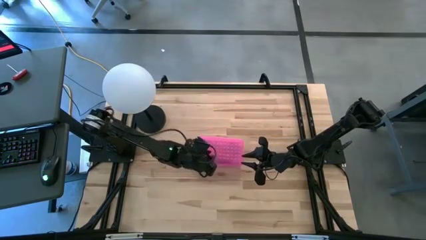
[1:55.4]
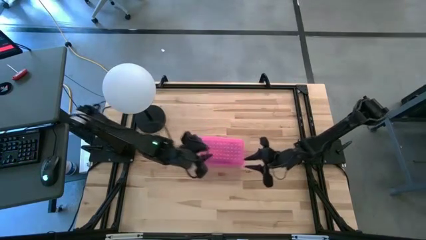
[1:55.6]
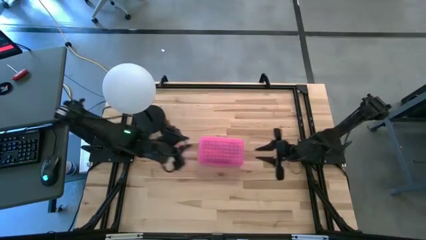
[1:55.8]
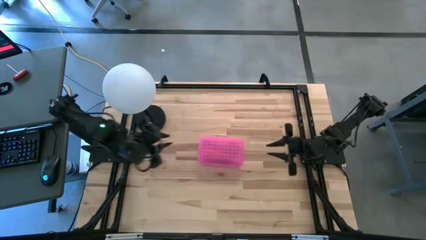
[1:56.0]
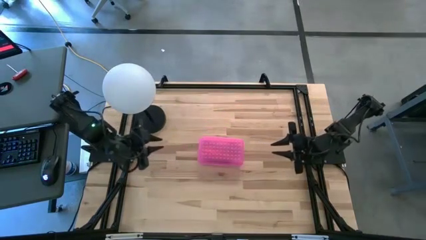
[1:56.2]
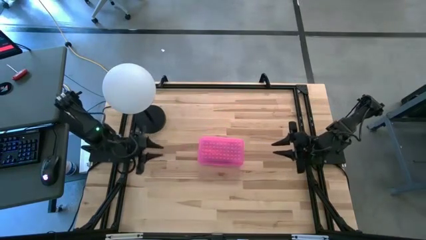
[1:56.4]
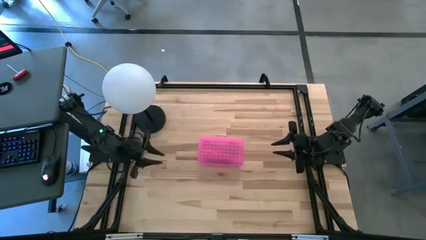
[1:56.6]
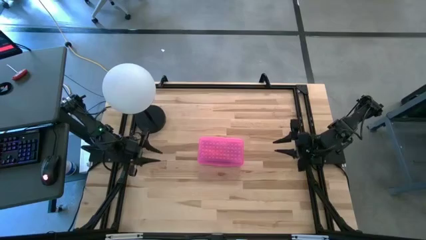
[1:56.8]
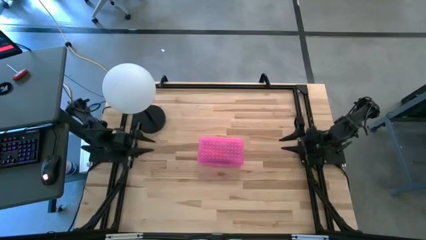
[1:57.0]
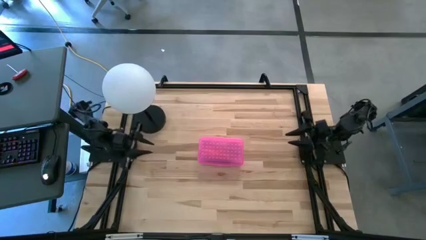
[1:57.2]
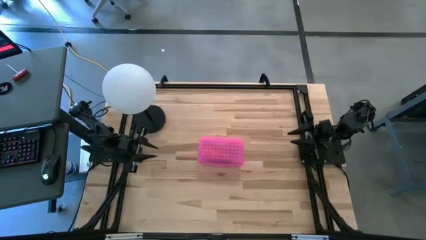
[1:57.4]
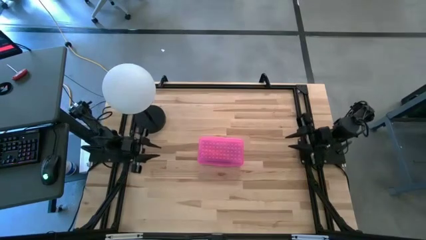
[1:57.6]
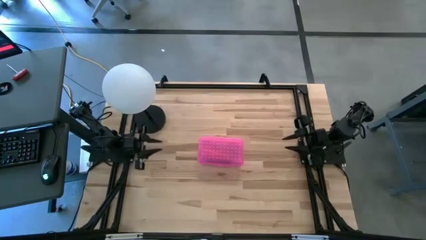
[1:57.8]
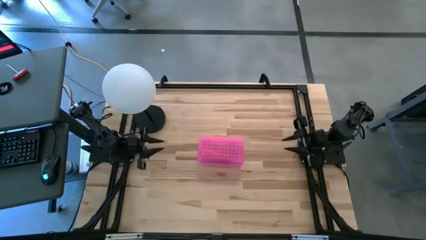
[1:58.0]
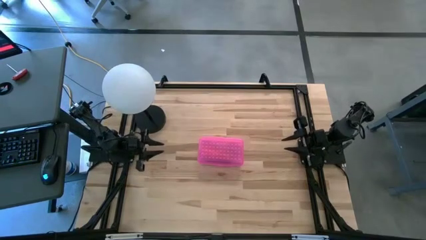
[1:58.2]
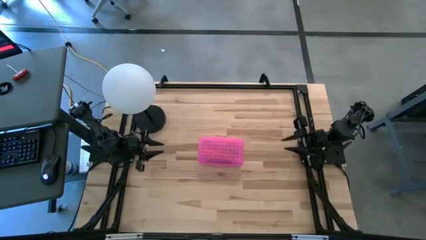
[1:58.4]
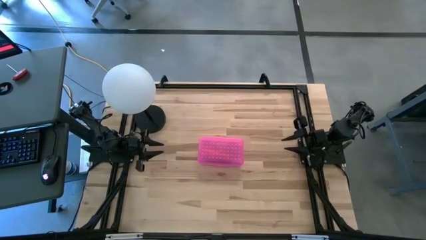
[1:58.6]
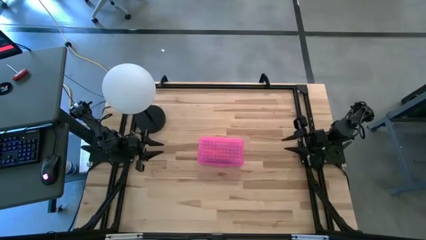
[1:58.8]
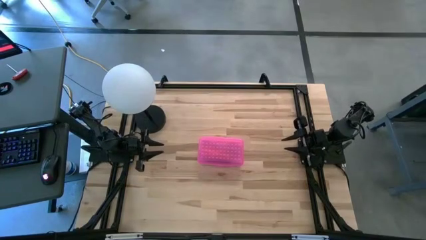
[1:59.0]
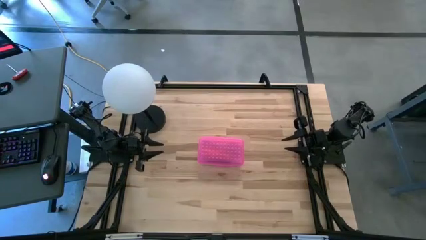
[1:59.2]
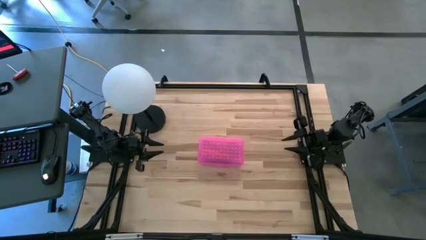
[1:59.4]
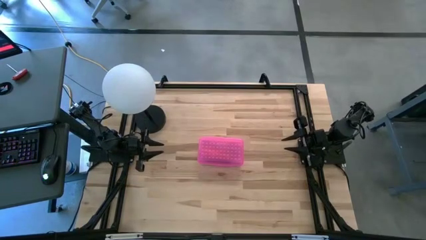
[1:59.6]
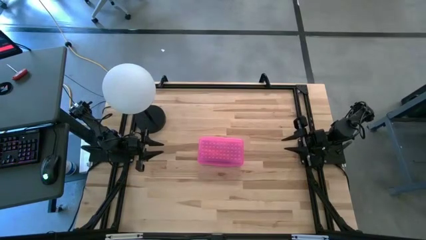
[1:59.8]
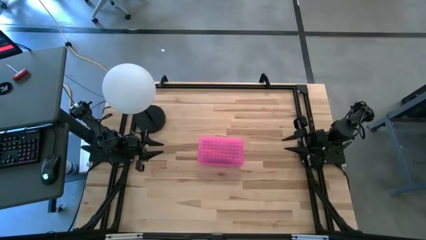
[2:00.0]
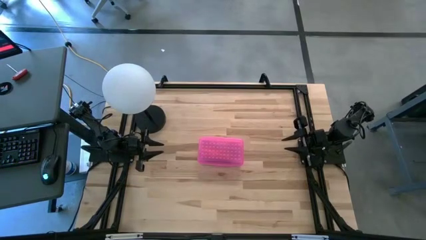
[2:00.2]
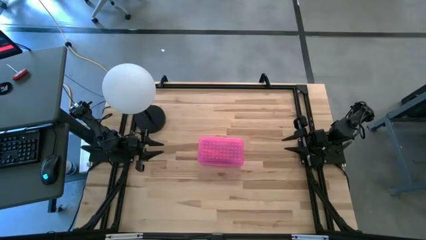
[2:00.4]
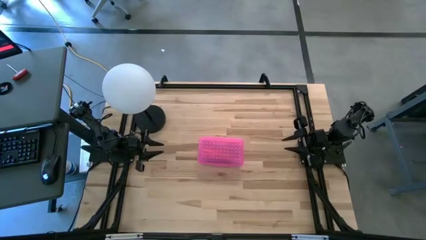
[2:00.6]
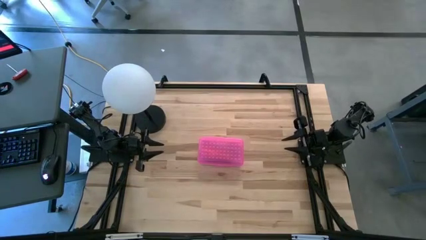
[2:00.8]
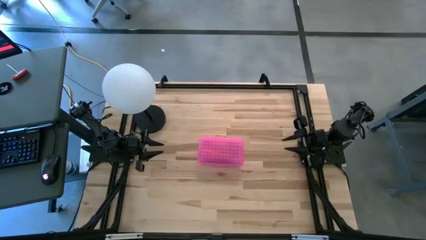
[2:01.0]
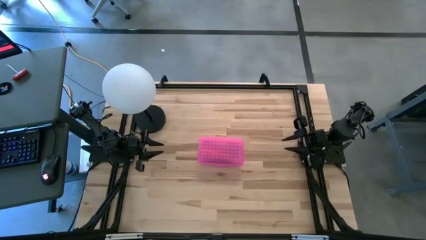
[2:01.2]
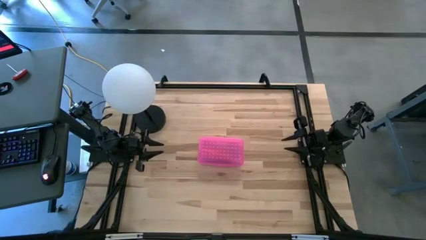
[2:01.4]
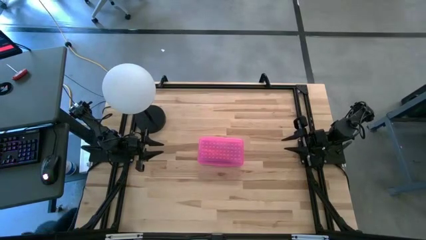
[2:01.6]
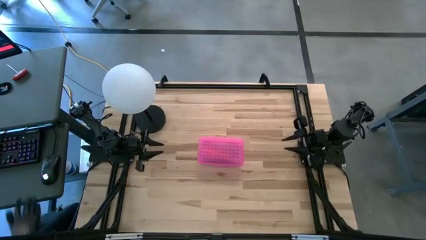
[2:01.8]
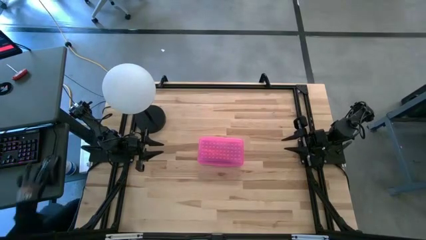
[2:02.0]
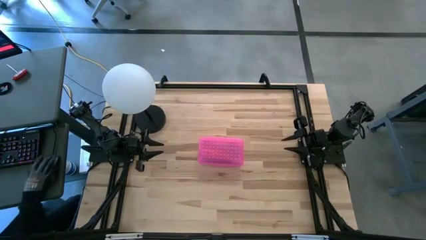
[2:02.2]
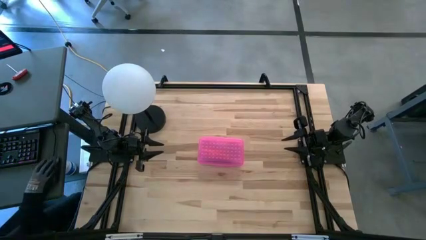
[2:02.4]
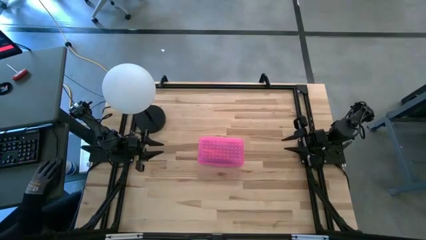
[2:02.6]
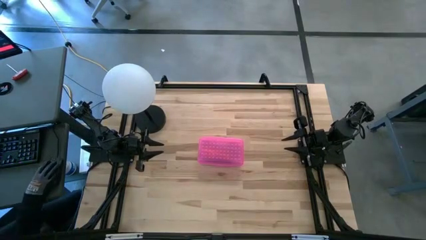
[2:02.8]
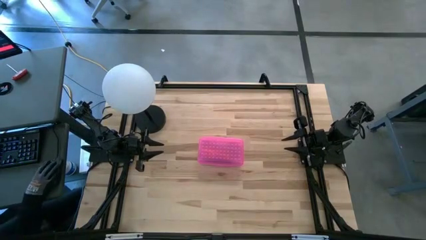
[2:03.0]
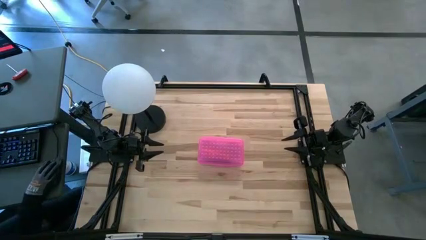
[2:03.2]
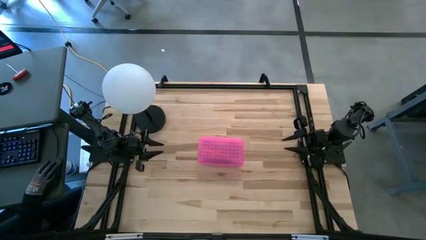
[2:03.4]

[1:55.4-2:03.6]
Task: Pick & place school supplies into a supply box
Return to Home Position
